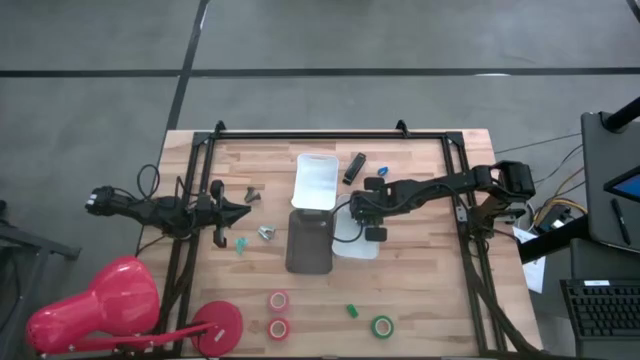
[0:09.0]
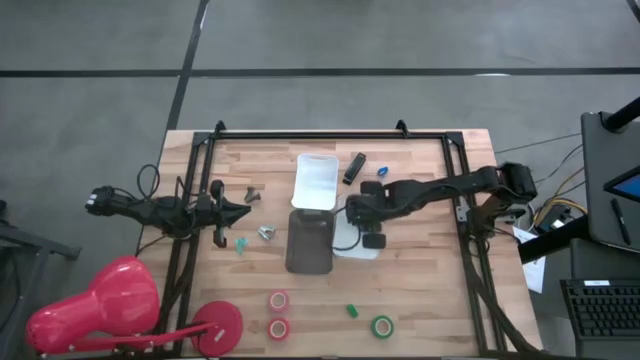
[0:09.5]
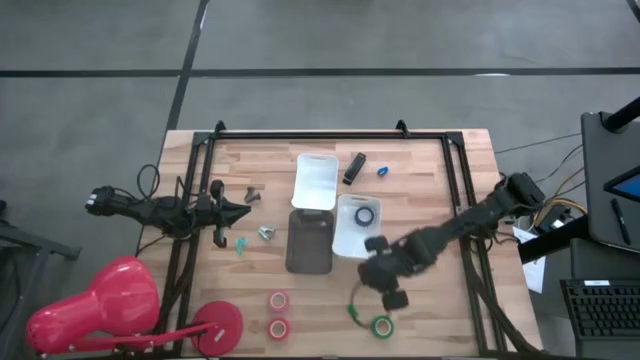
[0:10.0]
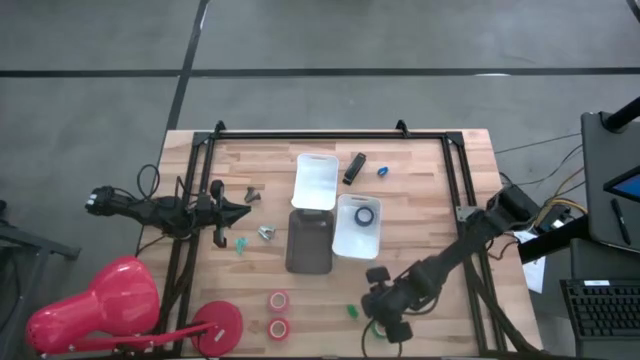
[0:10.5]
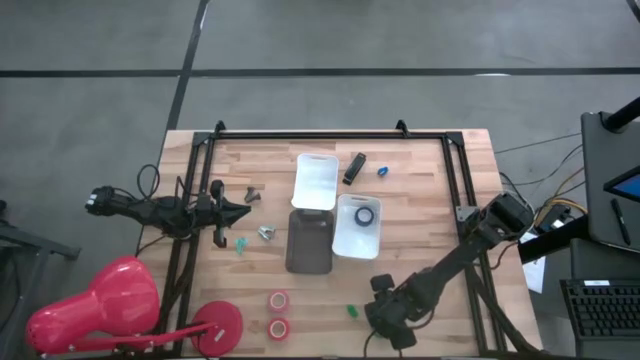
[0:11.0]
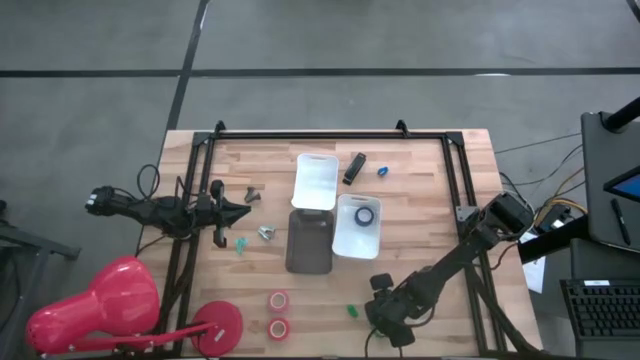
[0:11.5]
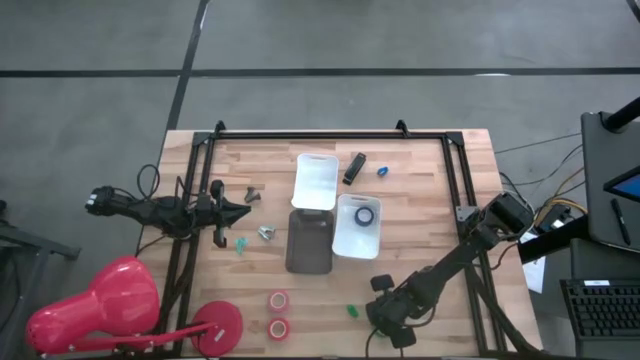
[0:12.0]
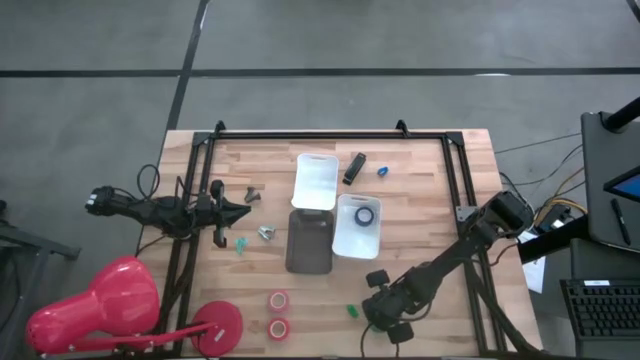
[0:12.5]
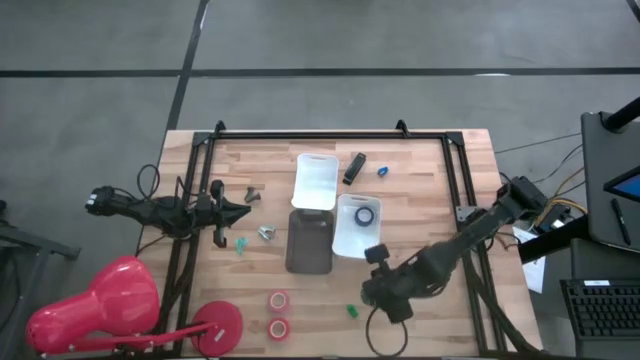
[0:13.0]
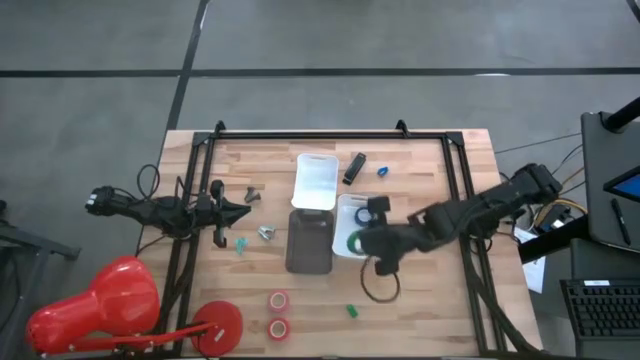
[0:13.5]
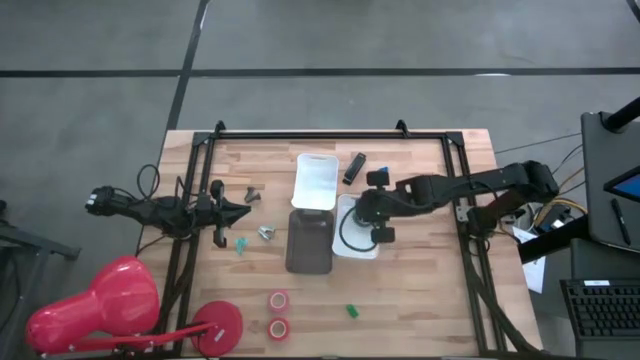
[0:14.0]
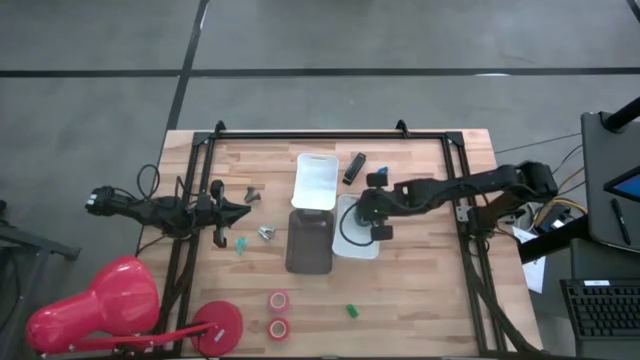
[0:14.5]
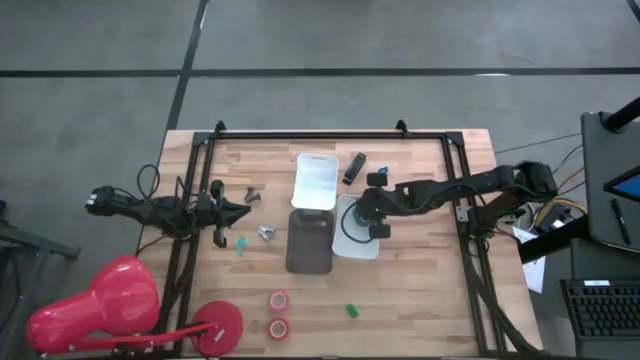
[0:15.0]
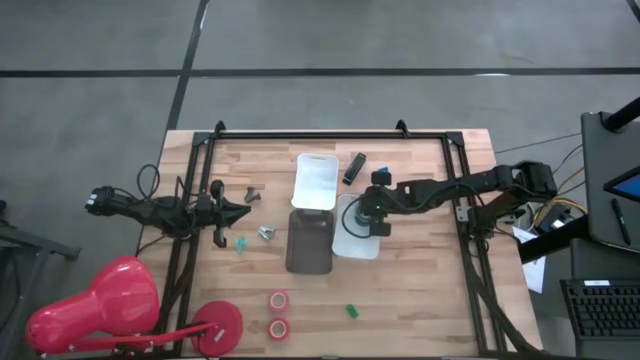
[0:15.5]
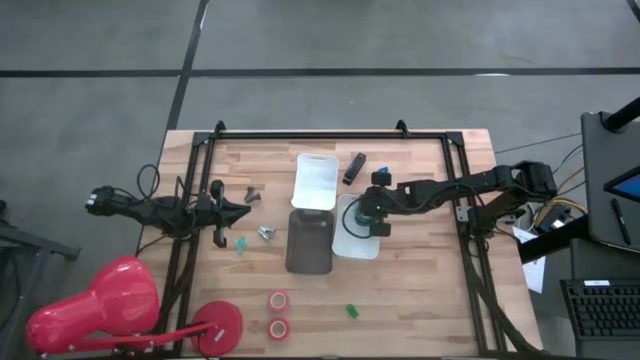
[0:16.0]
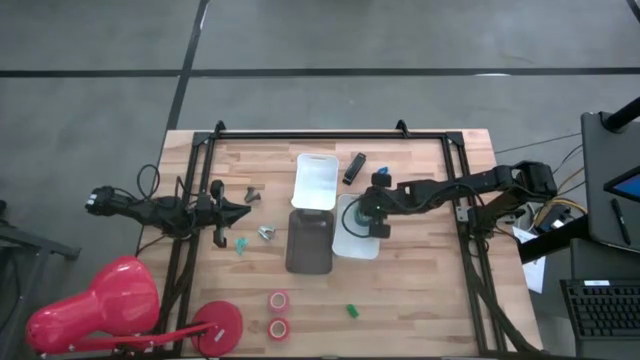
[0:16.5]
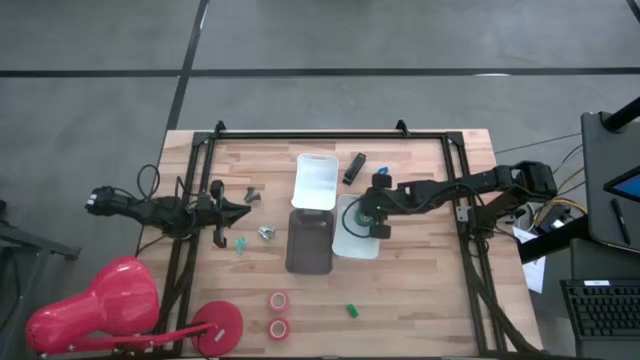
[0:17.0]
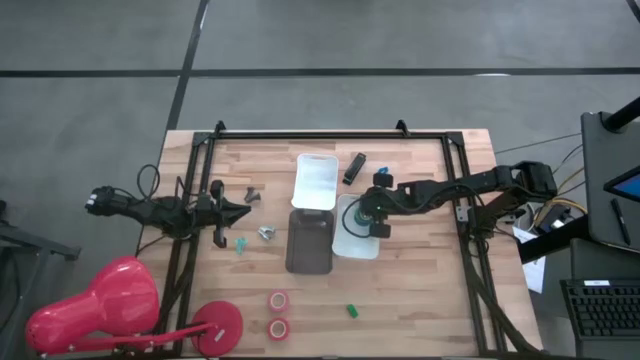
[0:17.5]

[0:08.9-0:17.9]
Task: Pick and place Stapler, Stapler remover, tape
Put the green tape into the bottom white bin

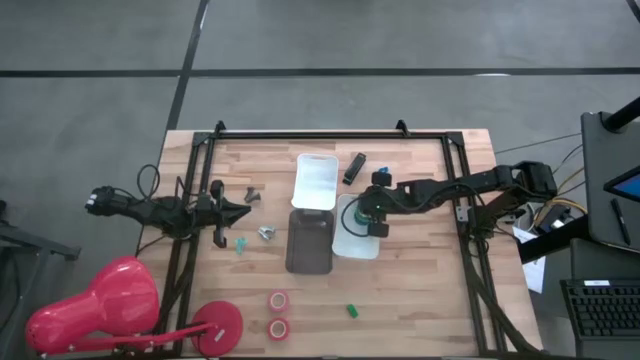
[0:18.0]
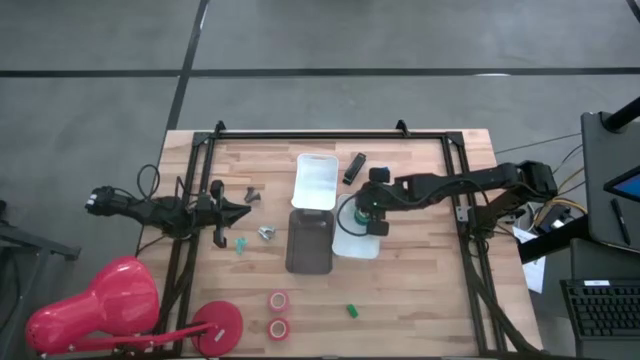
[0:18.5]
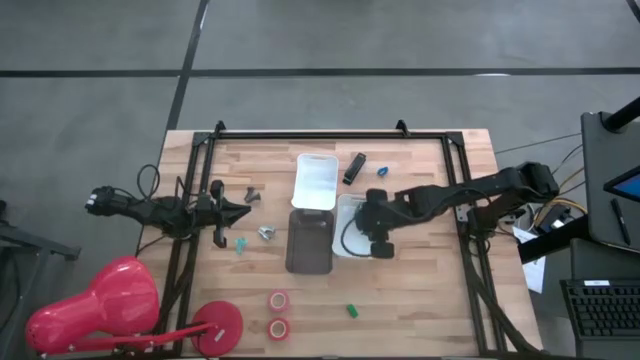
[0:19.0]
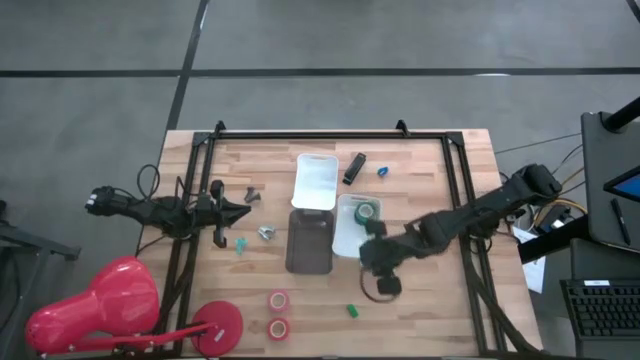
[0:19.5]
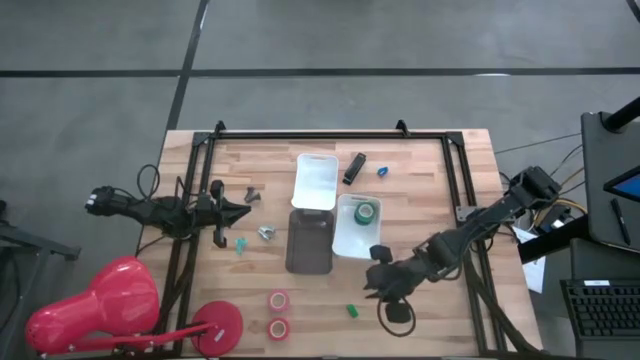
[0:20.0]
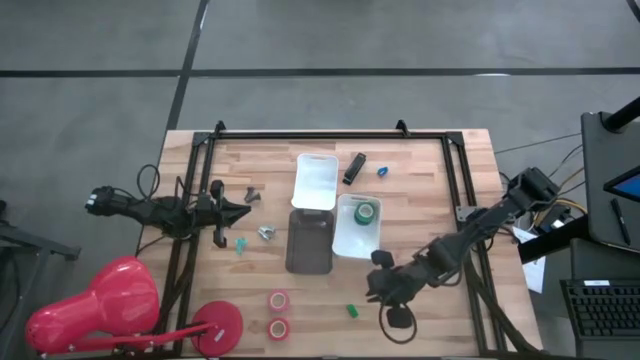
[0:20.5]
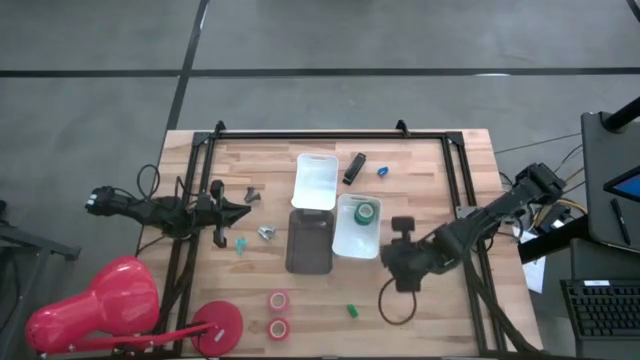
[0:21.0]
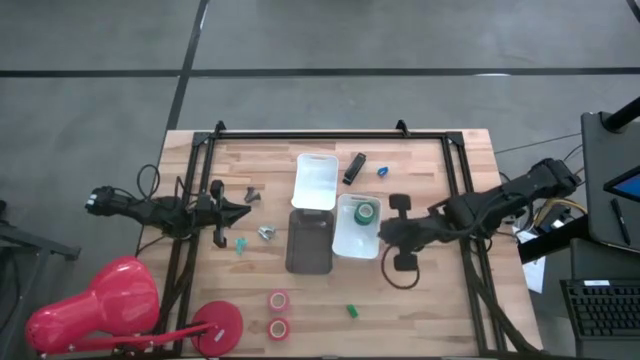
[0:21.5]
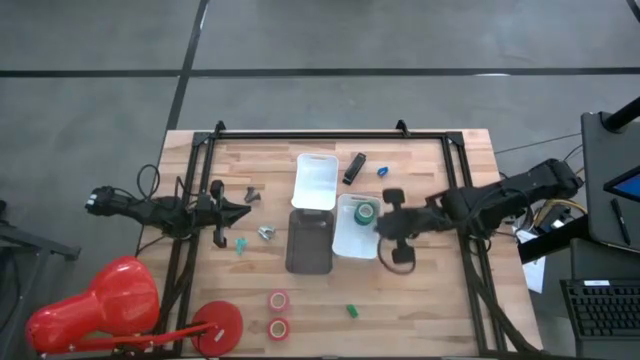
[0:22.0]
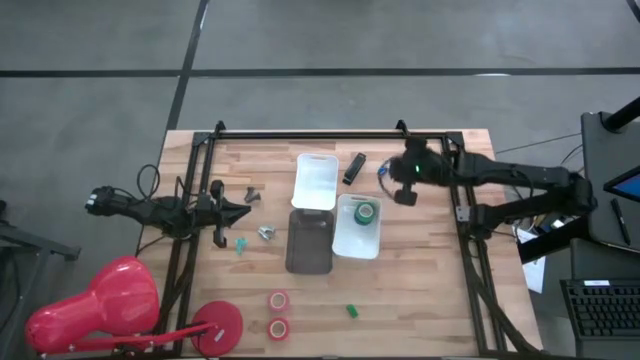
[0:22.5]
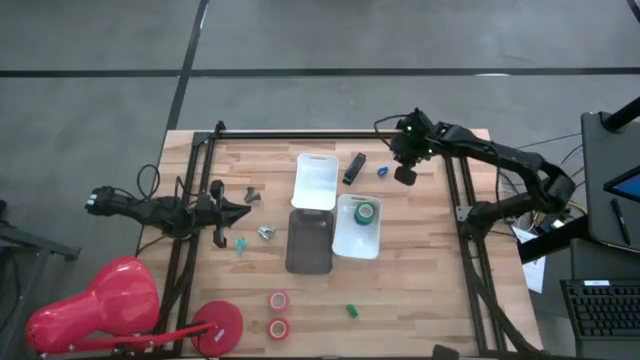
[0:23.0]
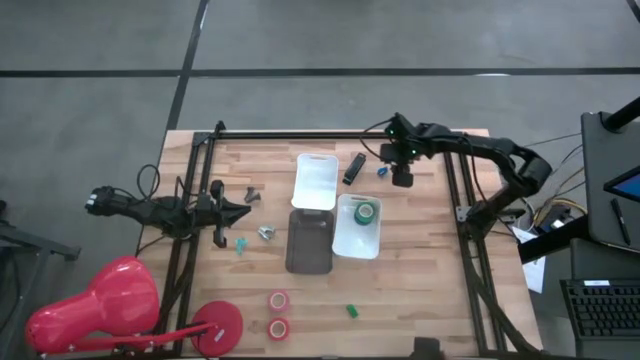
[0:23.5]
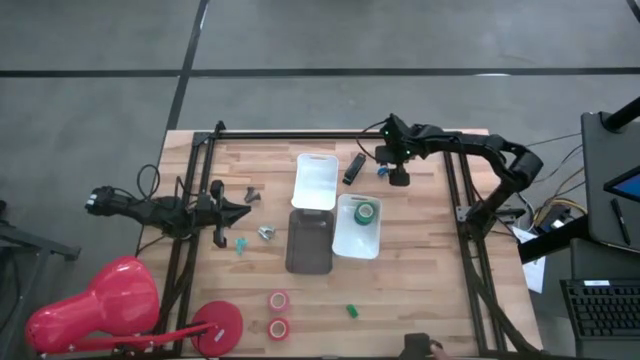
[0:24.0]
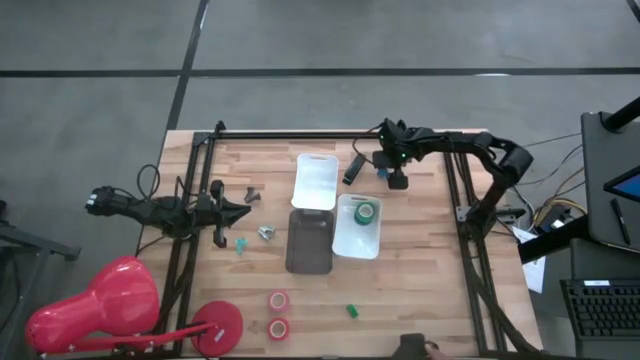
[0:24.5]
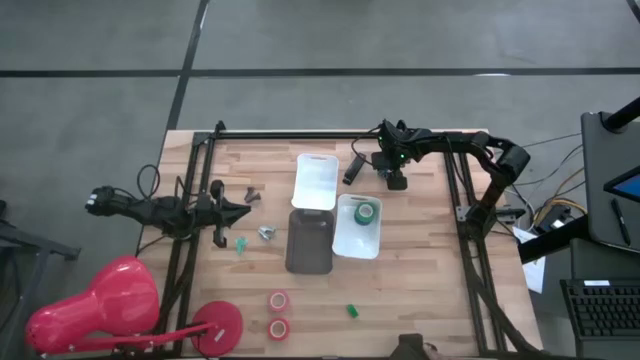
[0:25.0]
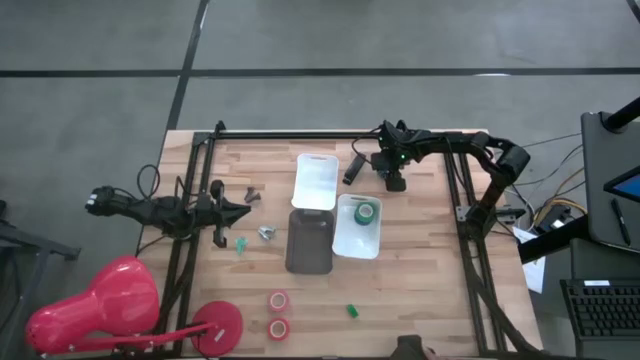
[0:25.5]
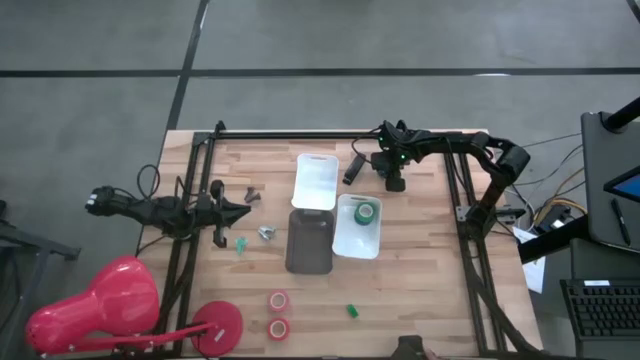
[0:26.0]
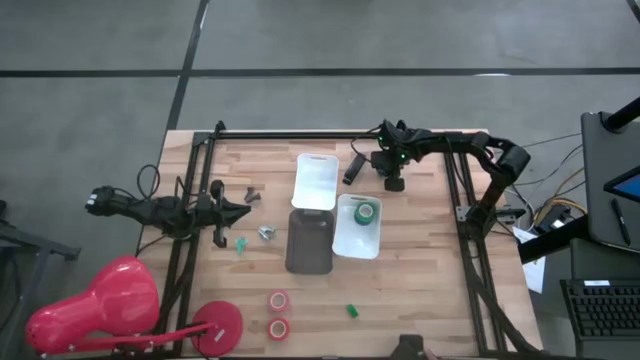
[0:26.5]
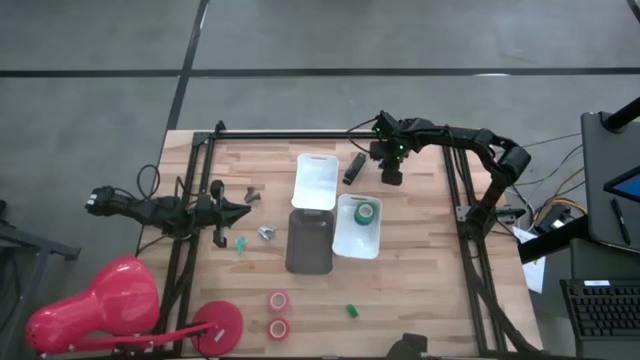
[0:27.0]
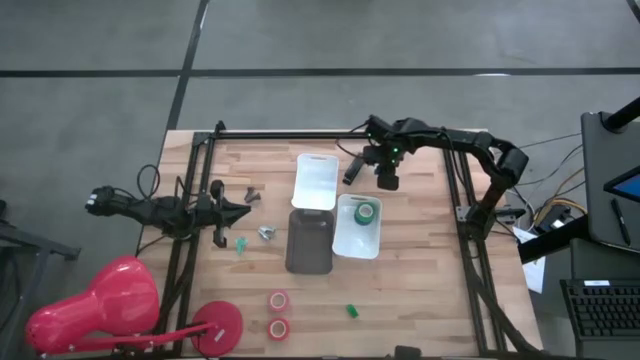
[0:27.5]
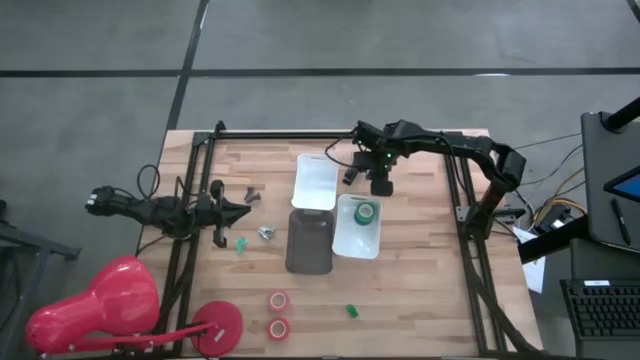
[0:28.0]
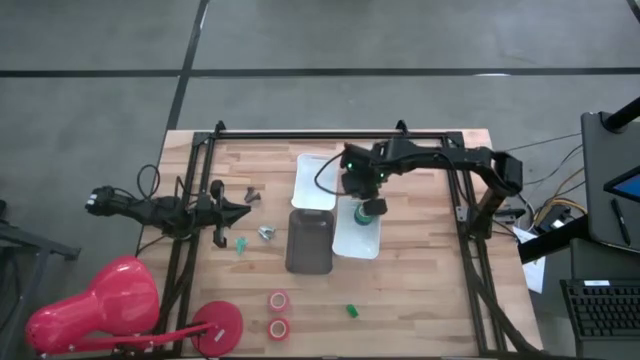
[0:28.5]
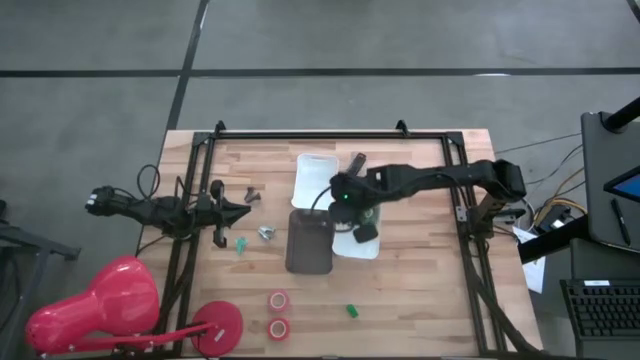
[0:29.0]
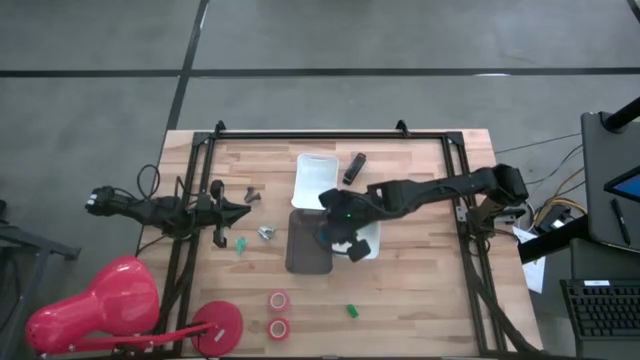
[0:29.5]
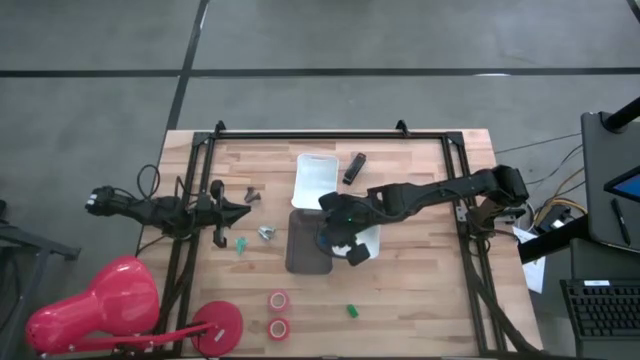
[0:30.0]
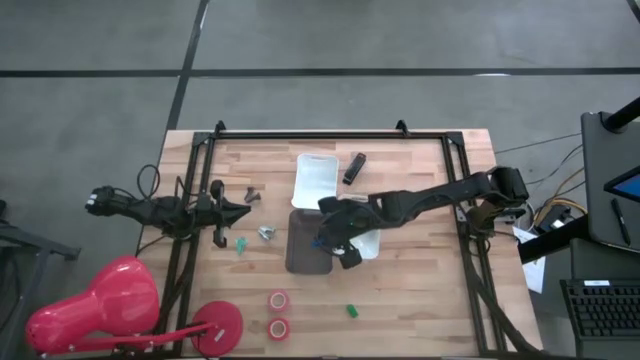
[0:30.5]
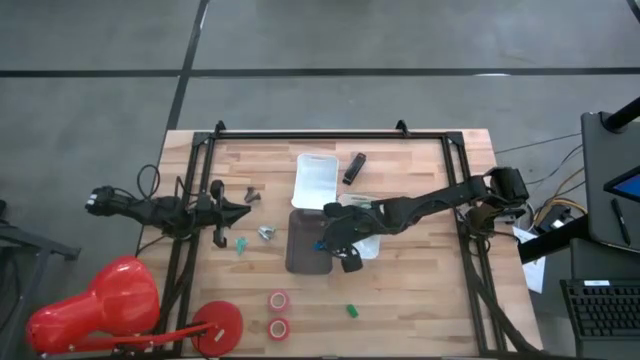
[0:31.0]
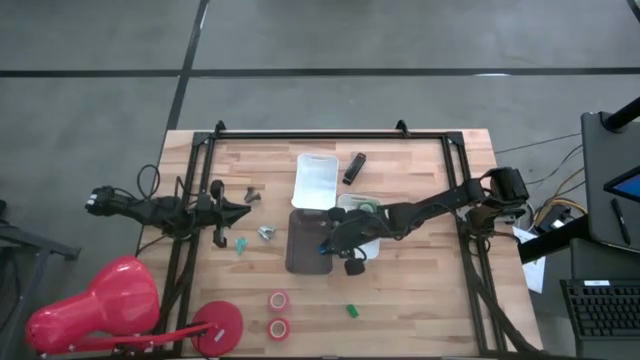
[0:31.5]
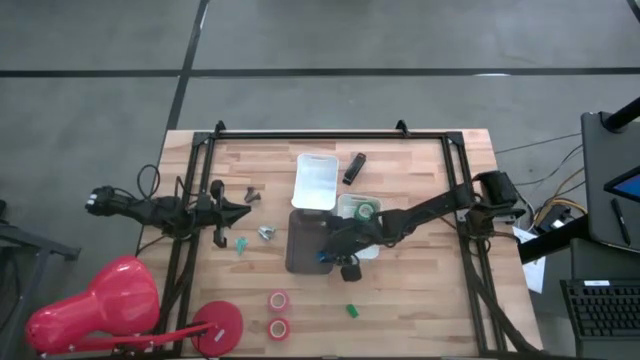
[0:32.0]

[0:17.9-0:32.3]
Put the blue stapler into the black bin
